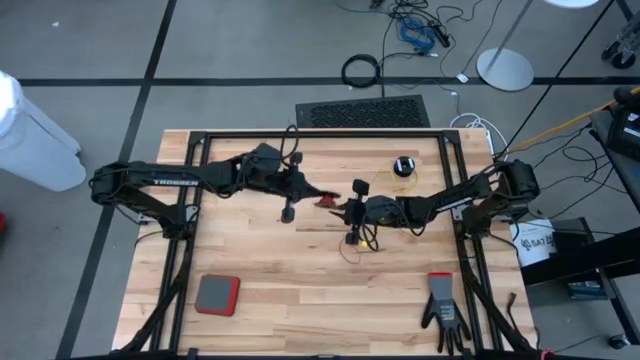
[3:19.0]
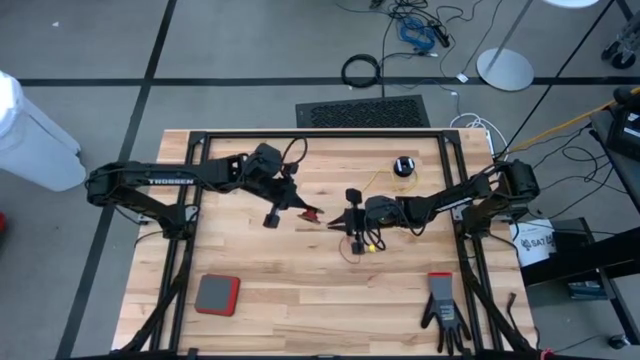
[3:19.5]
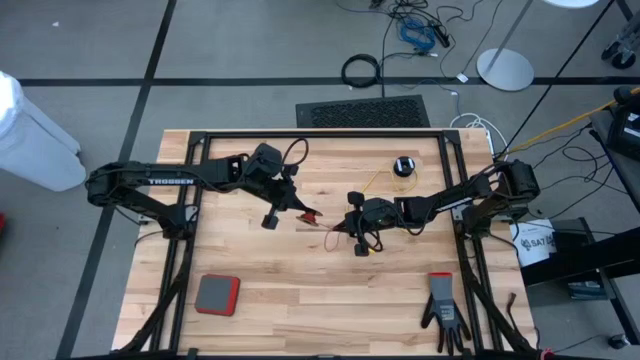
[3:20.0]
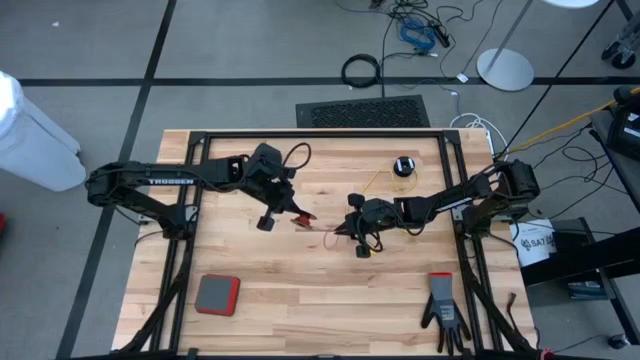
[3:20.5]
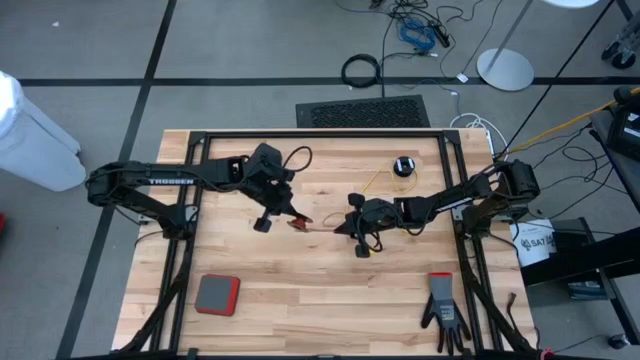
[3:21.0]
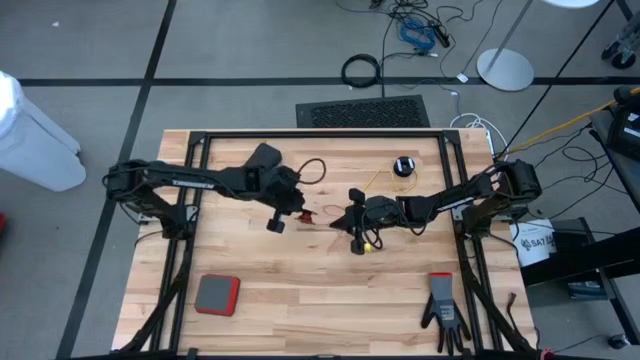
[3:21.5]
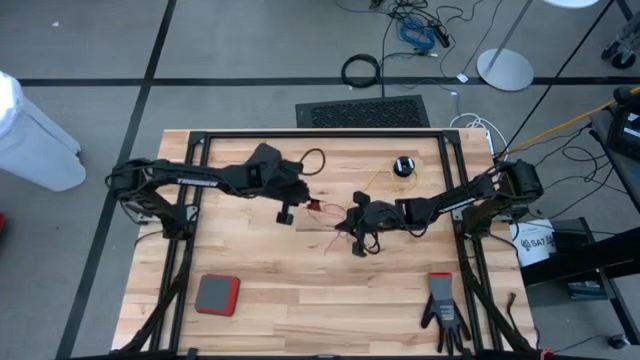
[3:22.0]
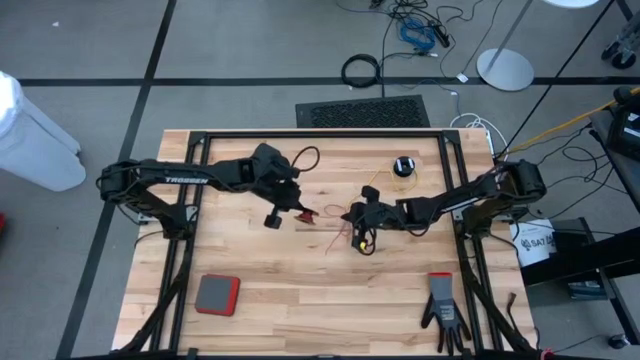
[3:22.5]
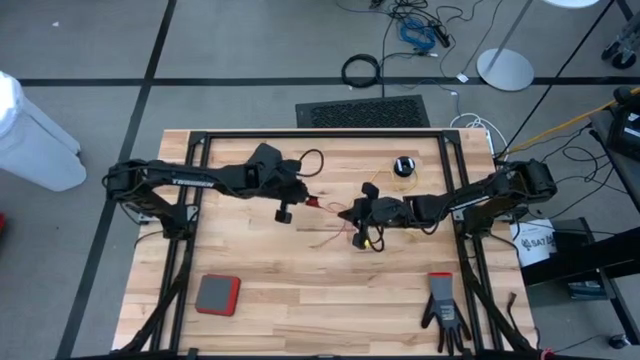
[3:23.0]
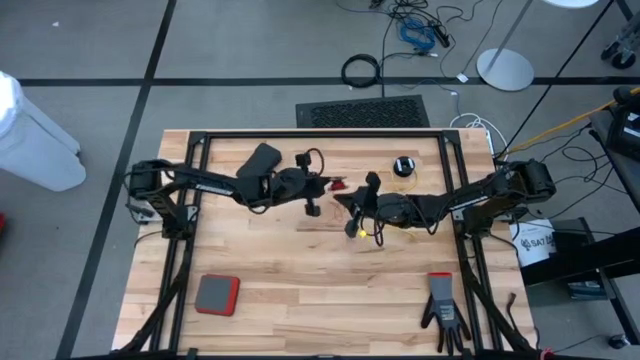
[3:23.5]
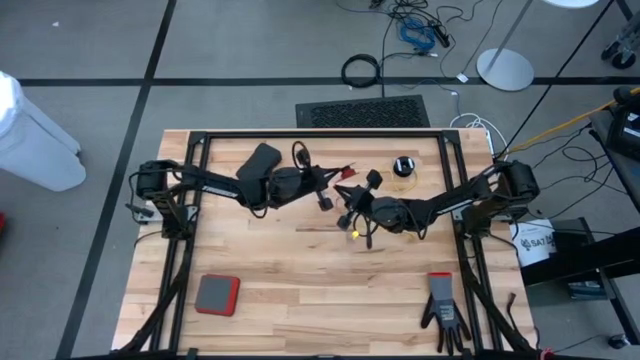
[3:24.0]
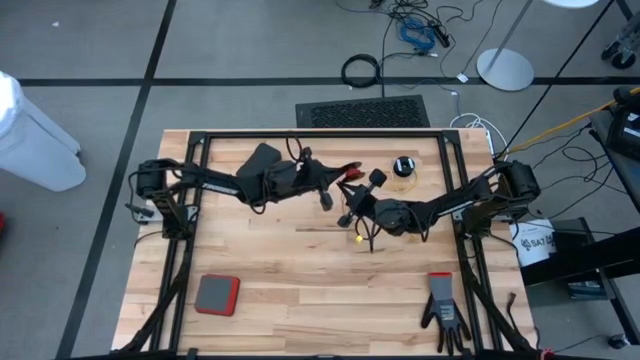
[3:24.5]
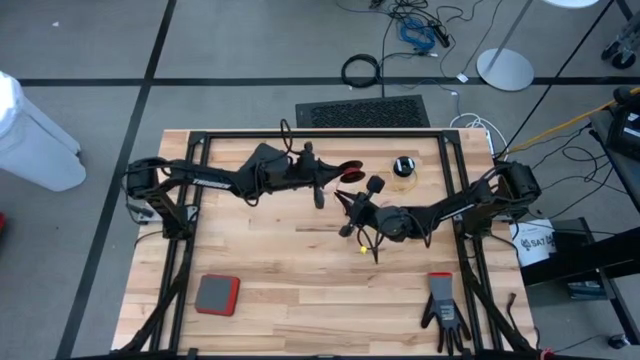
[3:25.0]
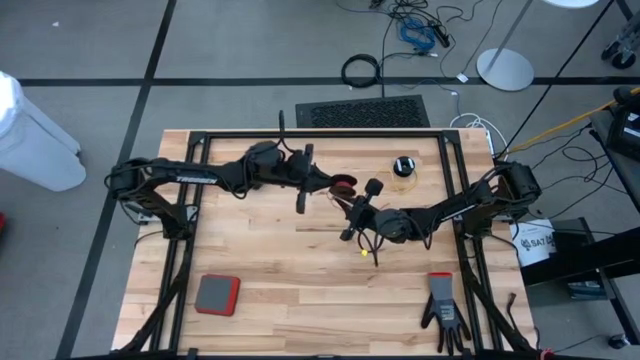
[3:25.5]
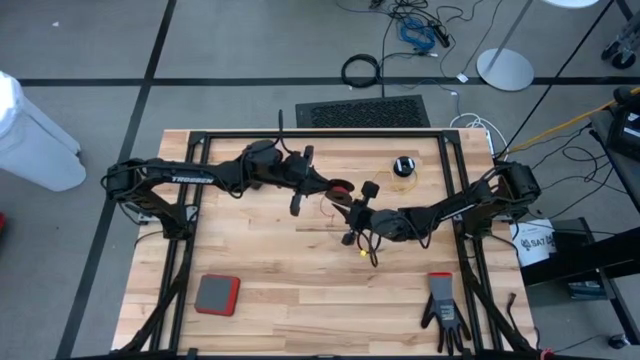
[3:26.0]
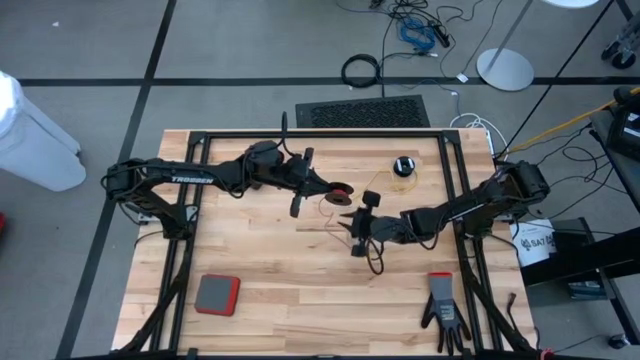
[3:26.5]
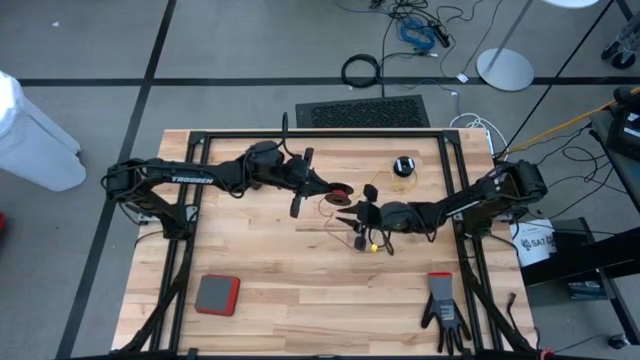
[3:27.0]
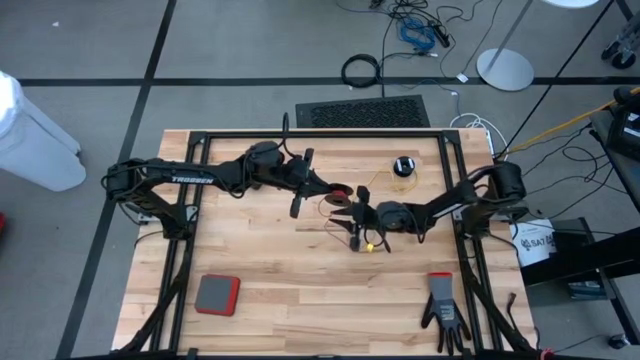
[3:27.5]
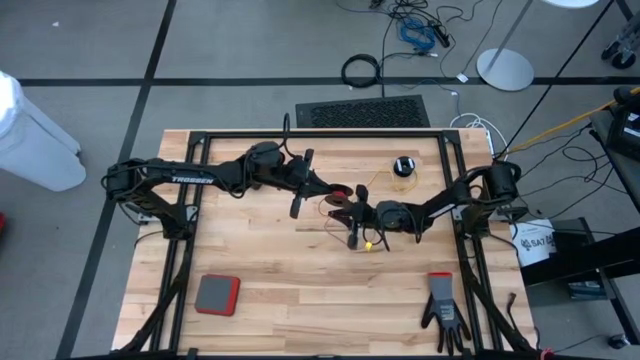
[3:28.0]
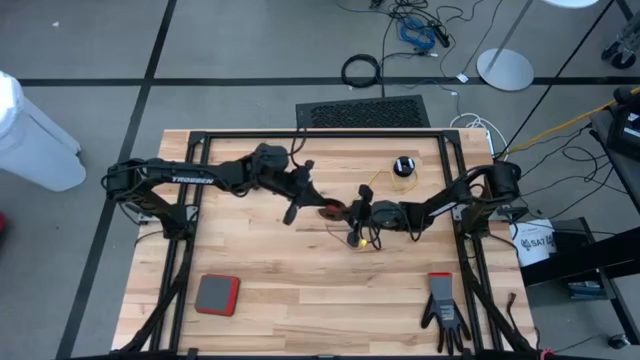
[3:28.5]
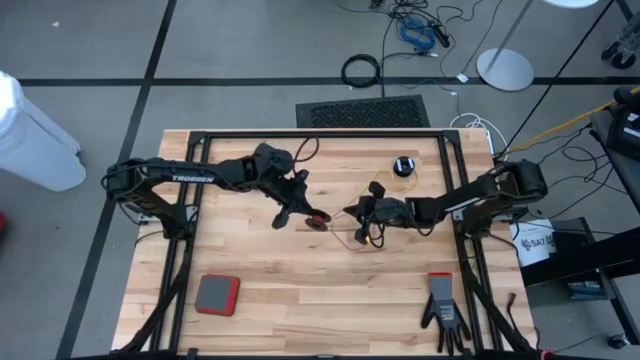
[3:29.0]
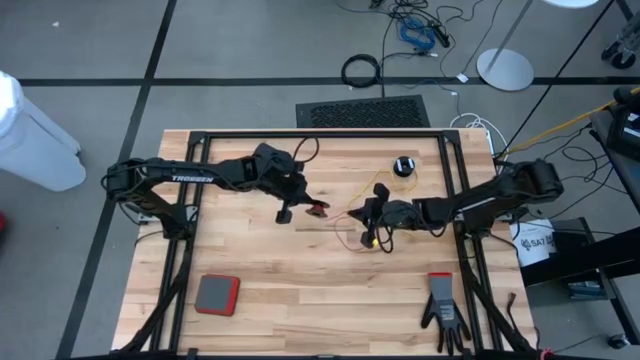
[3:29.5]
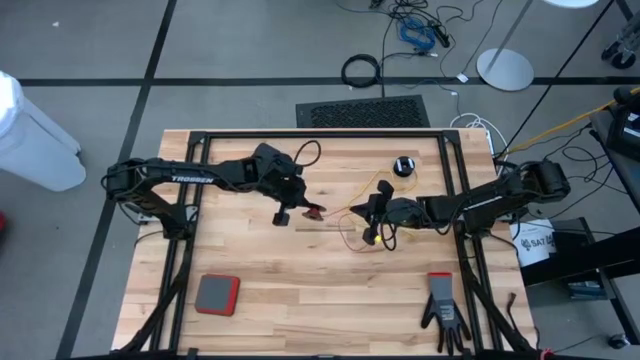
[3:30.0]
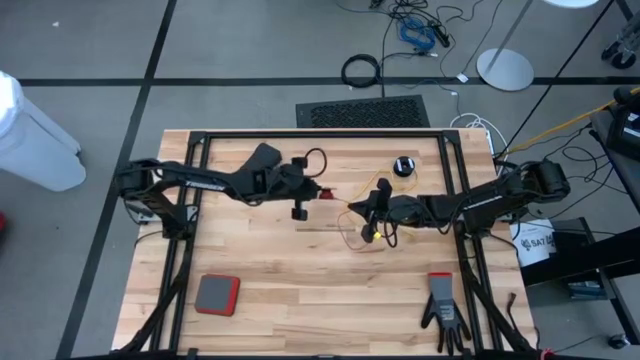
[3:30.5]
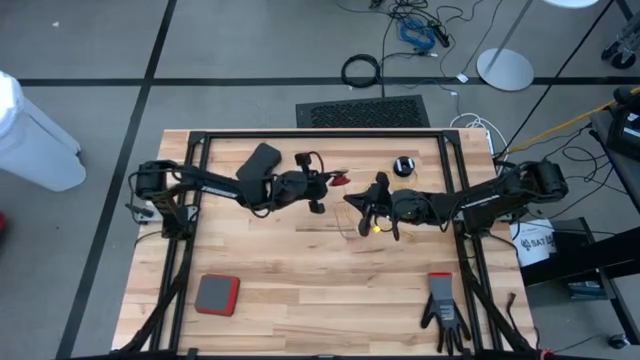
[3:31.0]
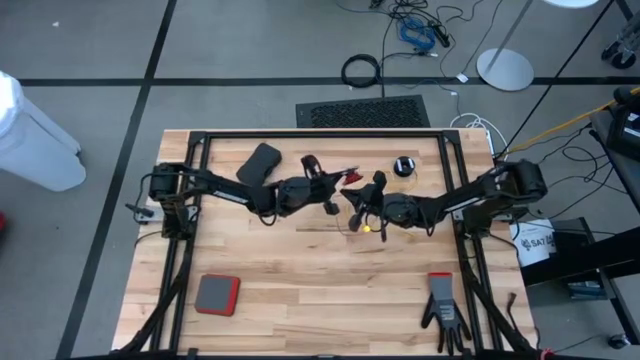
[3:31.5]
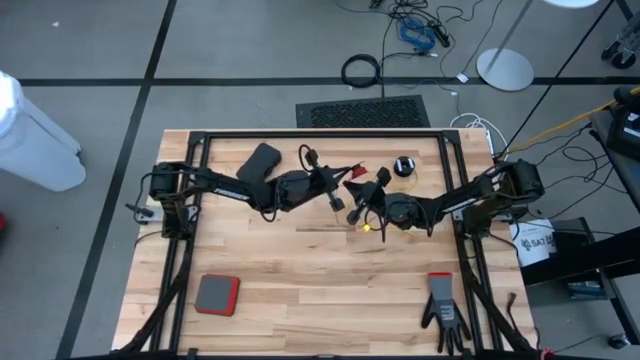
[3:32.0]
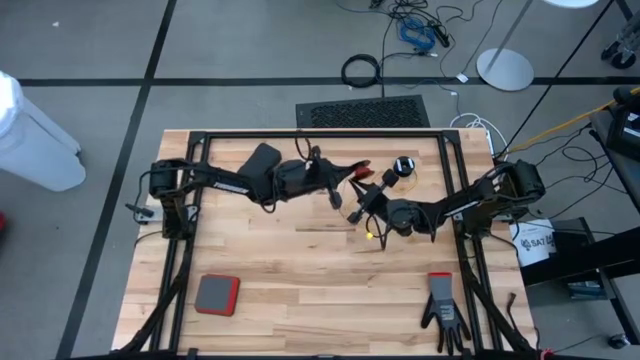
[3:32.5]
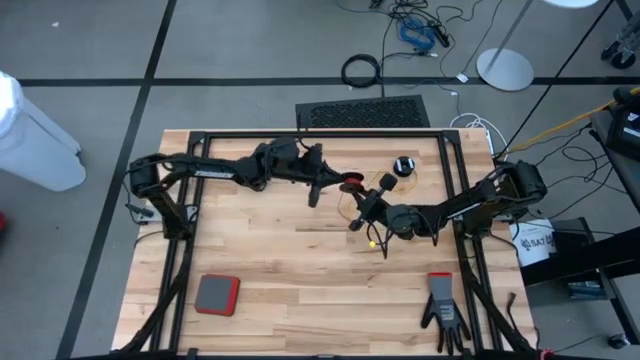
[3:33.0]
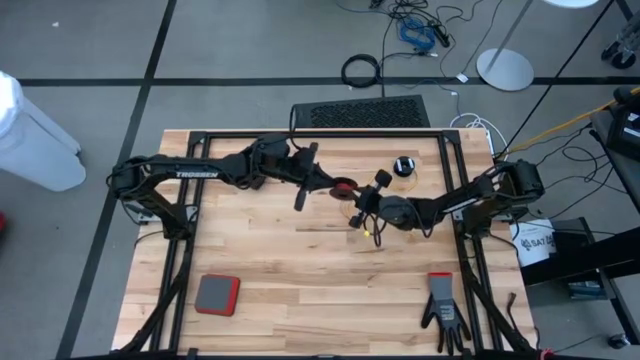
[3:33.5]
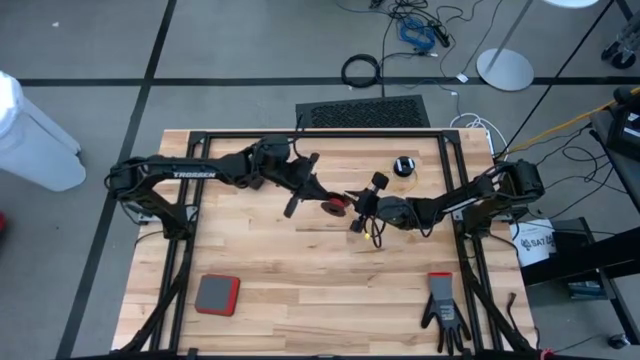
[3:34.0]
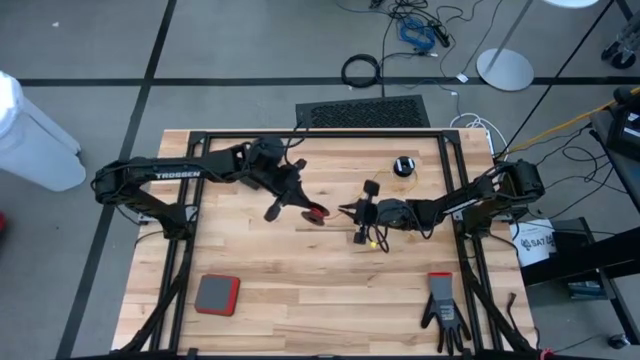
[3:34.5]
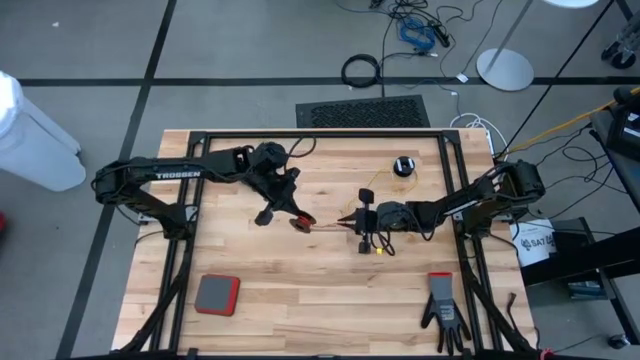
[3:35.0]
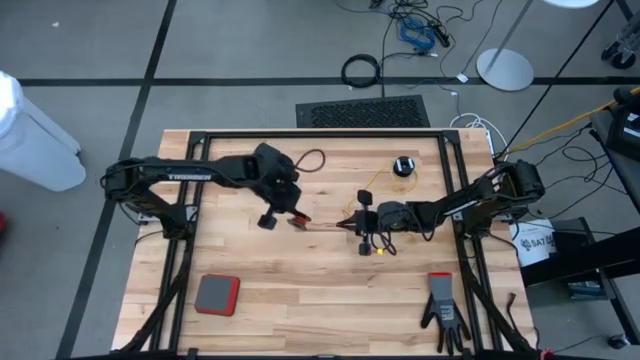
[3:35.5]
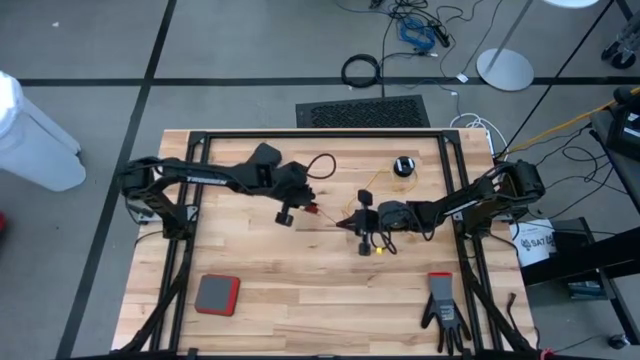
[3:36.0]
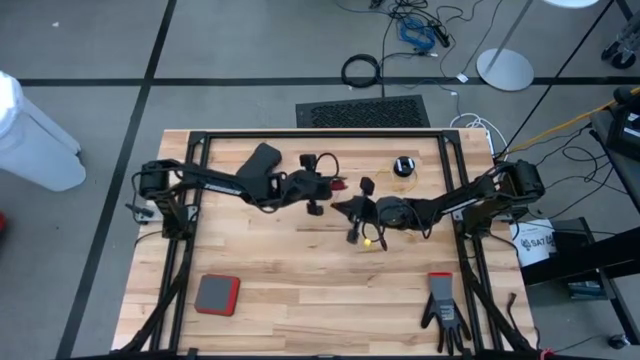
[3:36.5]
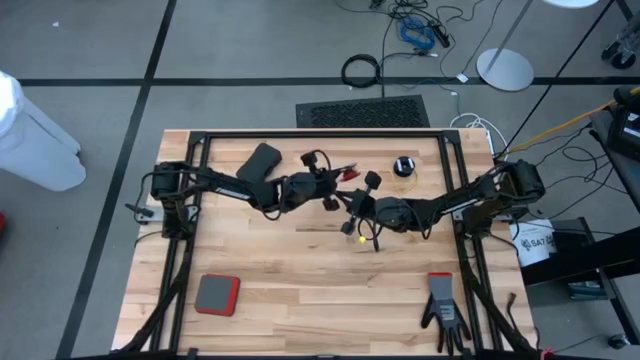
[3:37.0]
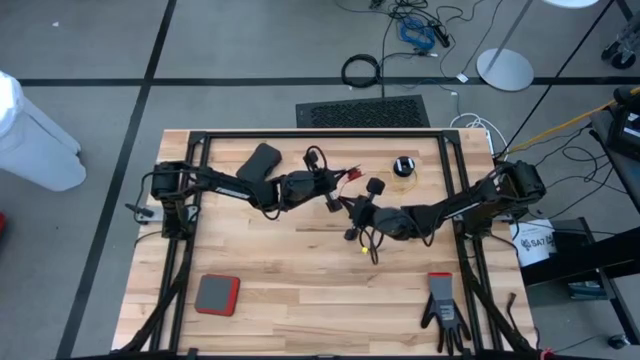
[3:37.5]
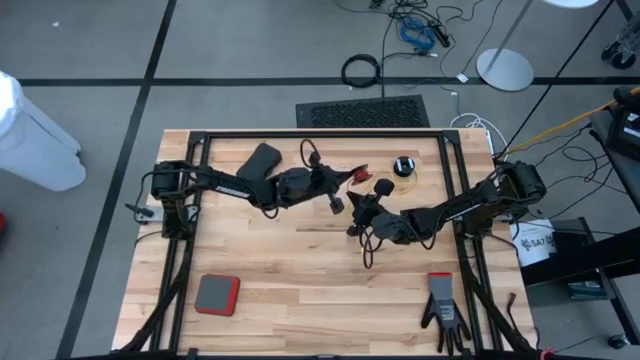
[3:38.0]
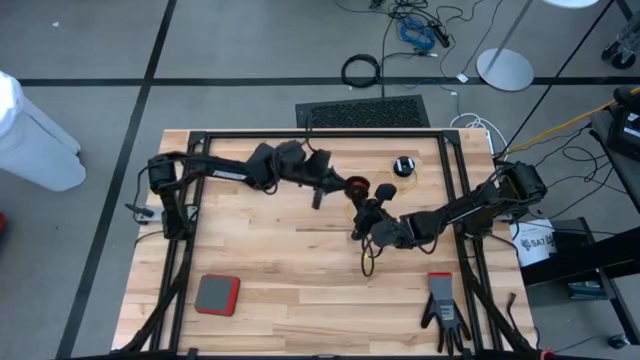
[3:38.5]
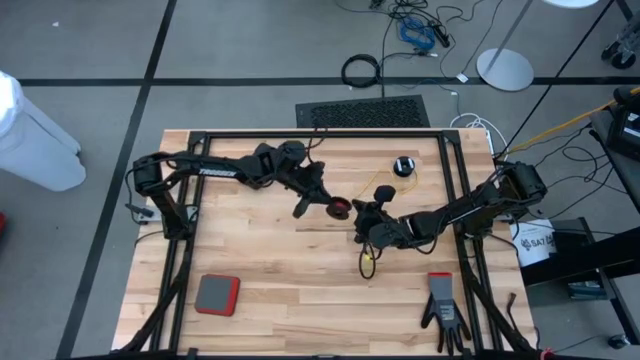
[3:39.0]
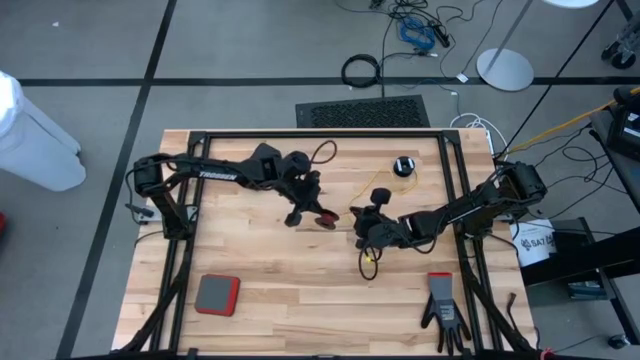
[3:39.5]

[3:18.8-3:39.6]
Task: Coil cords
Coil the red wire on the spool

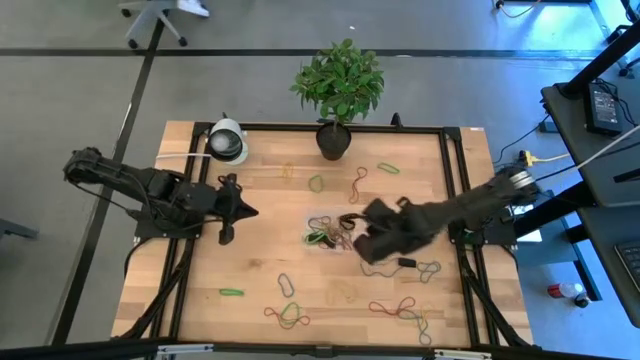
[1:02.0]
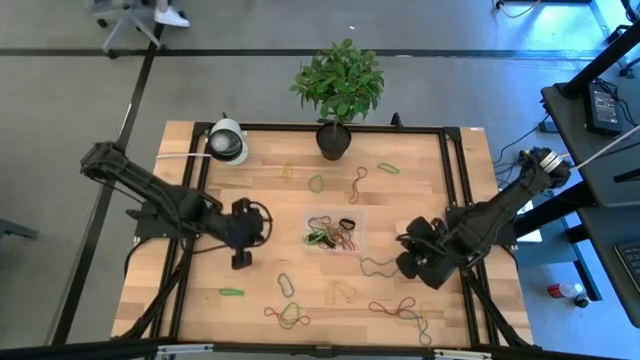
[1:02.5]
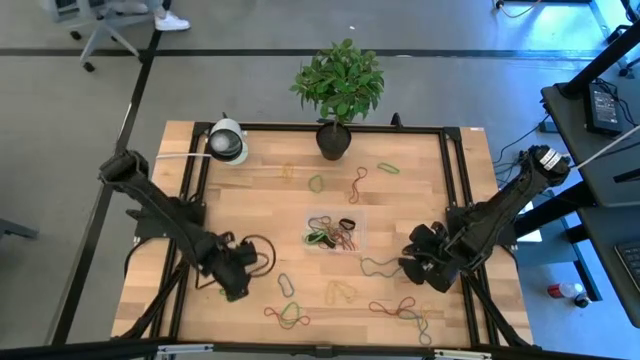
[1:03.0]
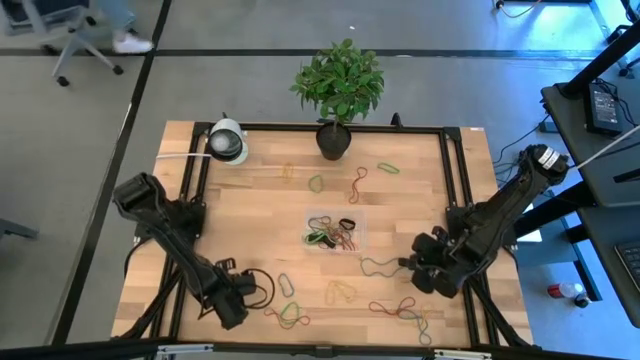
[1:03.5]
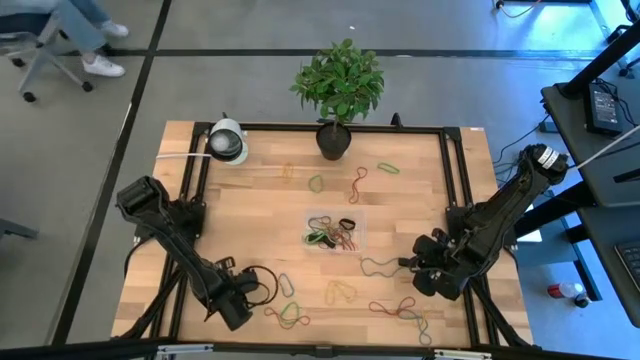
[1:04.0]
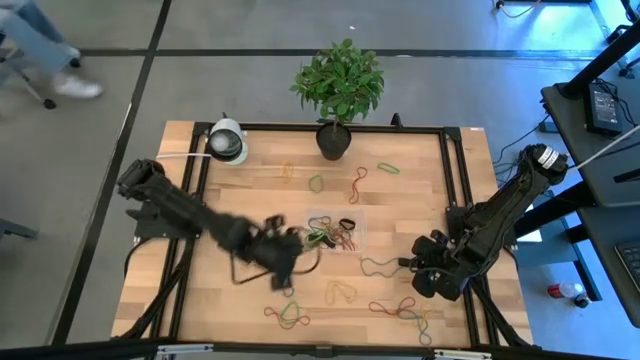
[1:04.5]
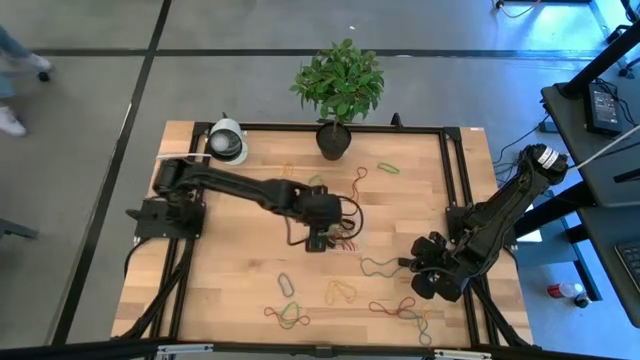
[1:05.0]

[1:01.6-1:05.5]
Task: Pick and place rubber bands into bin
Put the green rubber band into the bin
